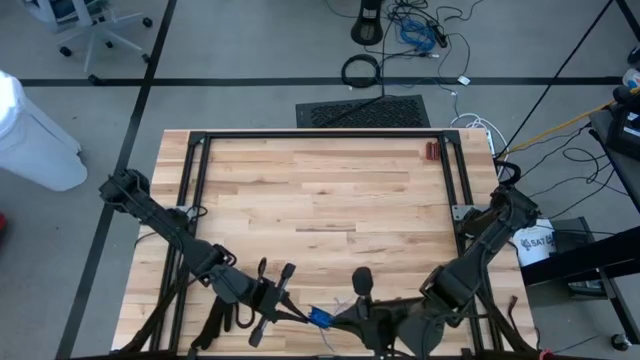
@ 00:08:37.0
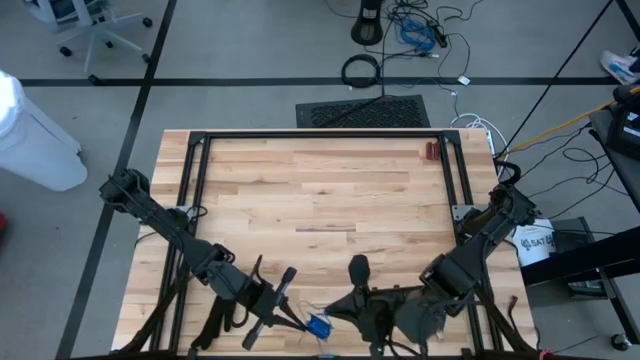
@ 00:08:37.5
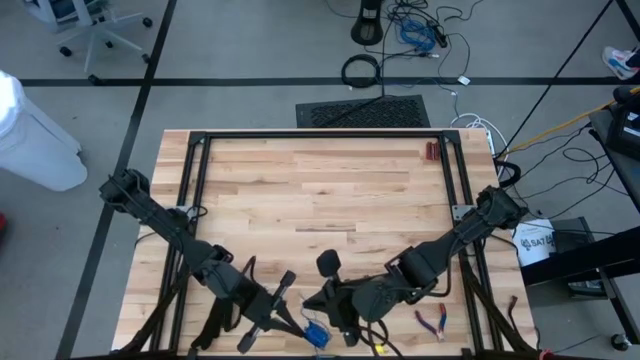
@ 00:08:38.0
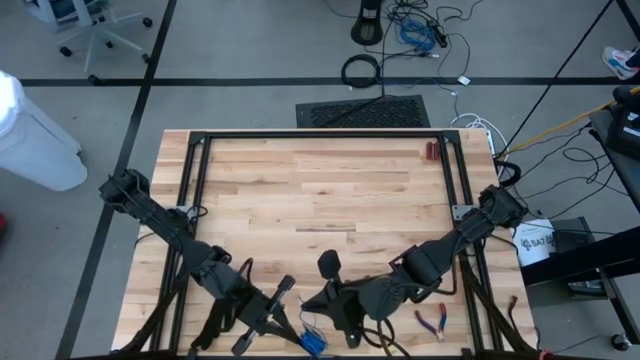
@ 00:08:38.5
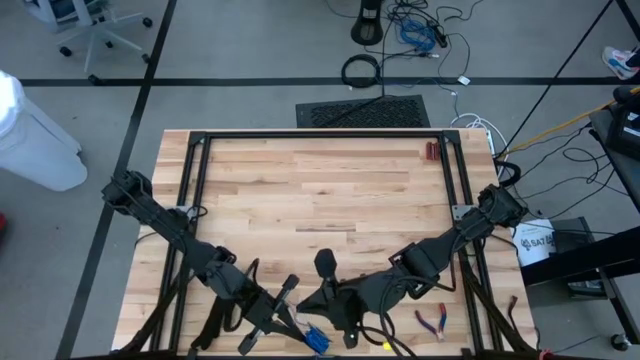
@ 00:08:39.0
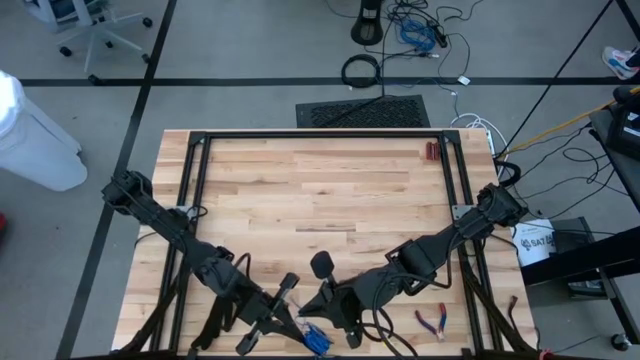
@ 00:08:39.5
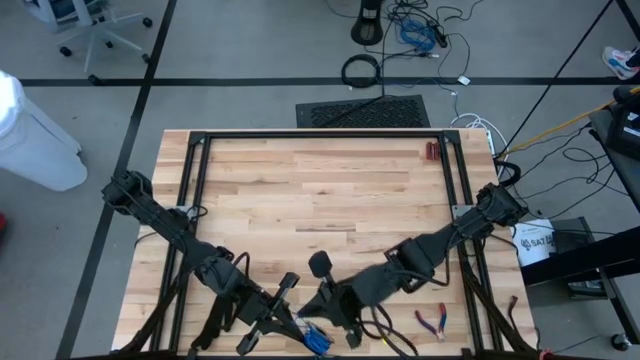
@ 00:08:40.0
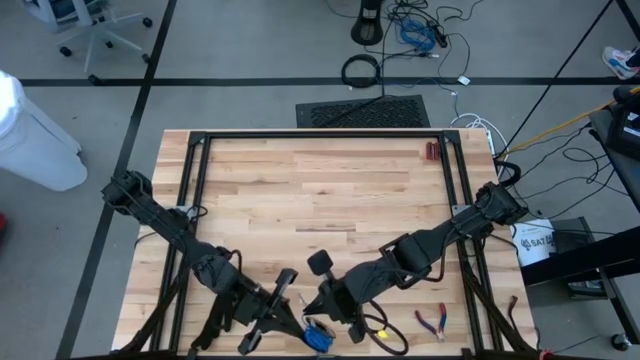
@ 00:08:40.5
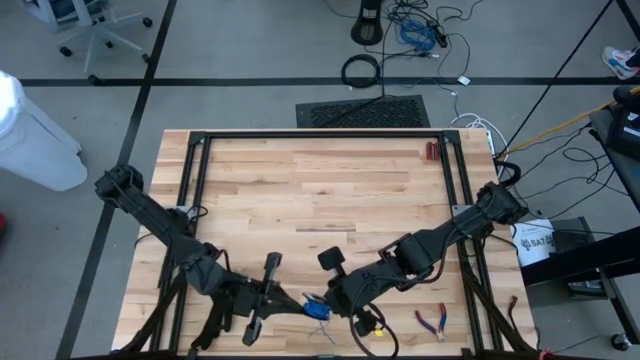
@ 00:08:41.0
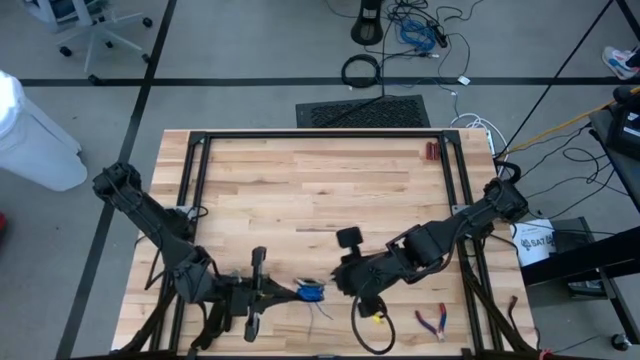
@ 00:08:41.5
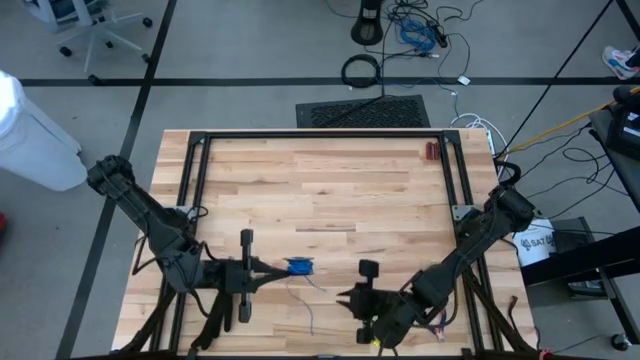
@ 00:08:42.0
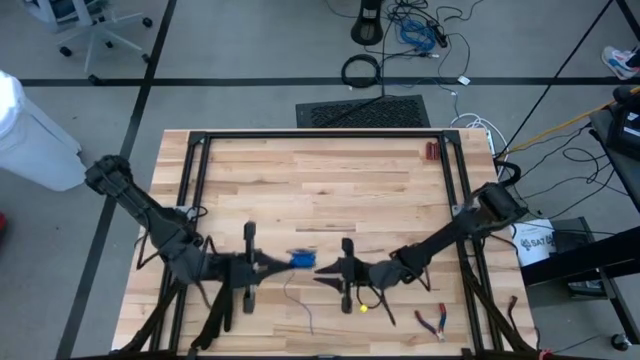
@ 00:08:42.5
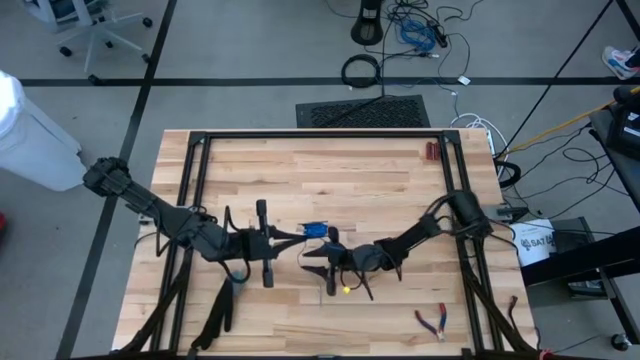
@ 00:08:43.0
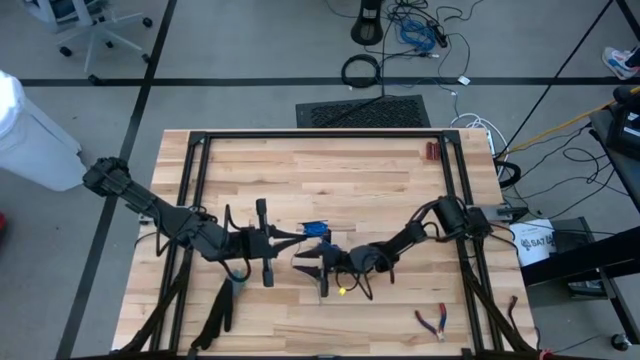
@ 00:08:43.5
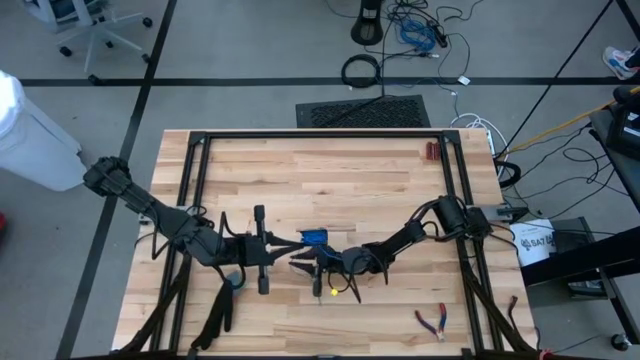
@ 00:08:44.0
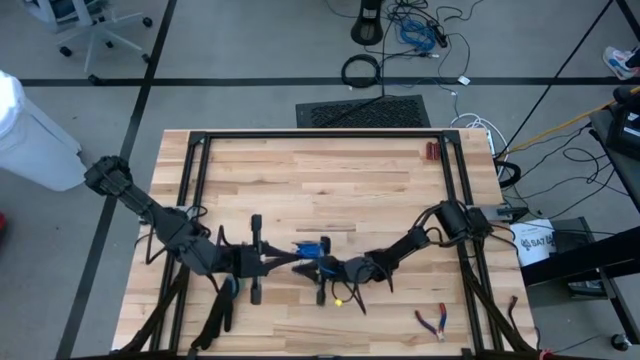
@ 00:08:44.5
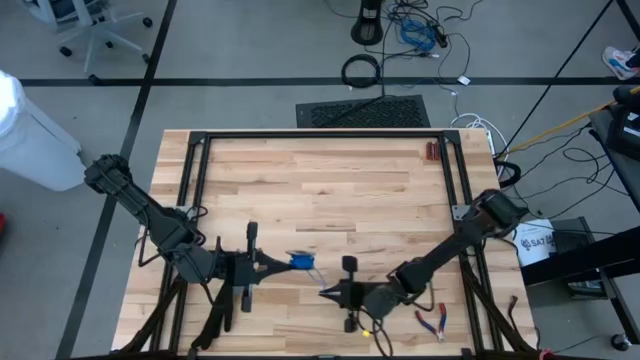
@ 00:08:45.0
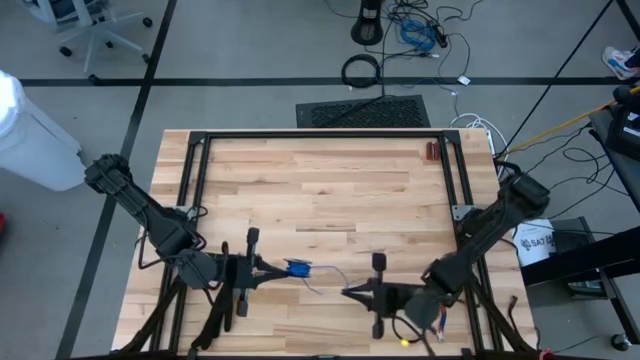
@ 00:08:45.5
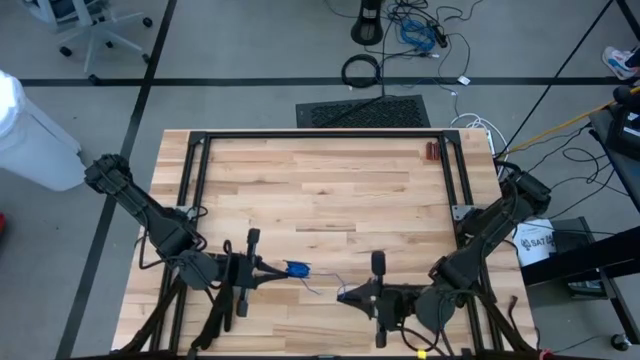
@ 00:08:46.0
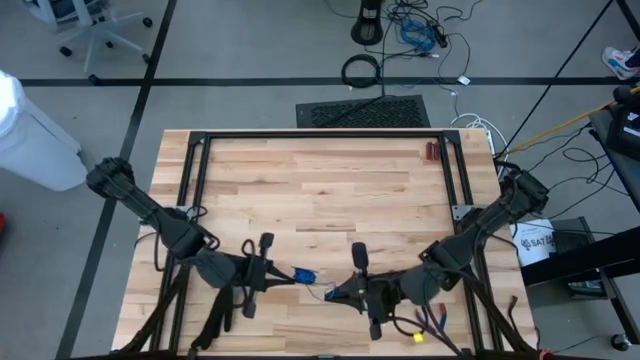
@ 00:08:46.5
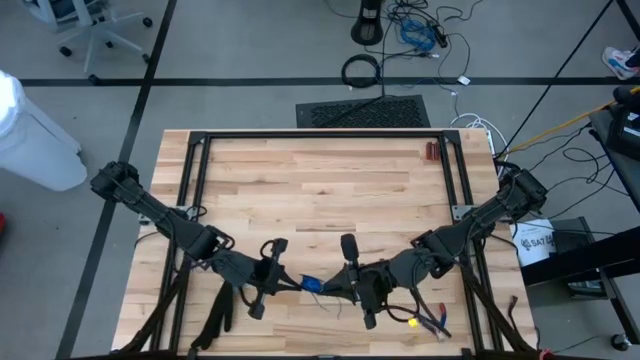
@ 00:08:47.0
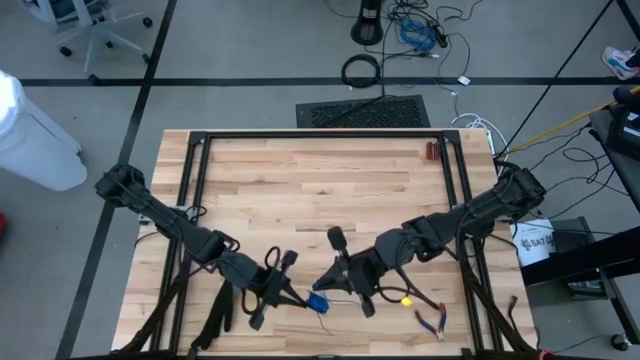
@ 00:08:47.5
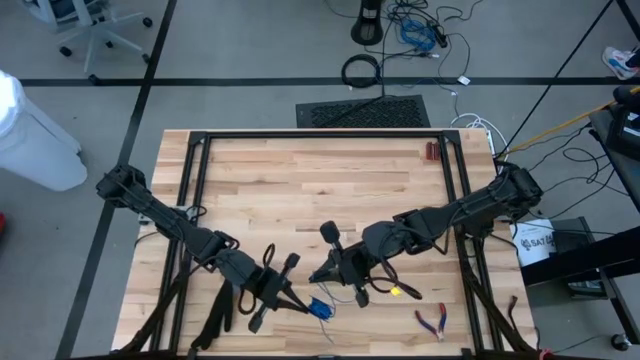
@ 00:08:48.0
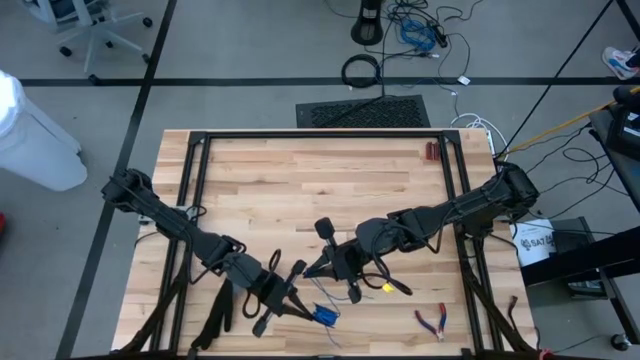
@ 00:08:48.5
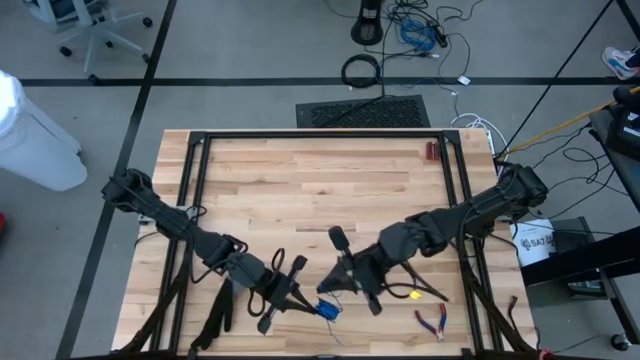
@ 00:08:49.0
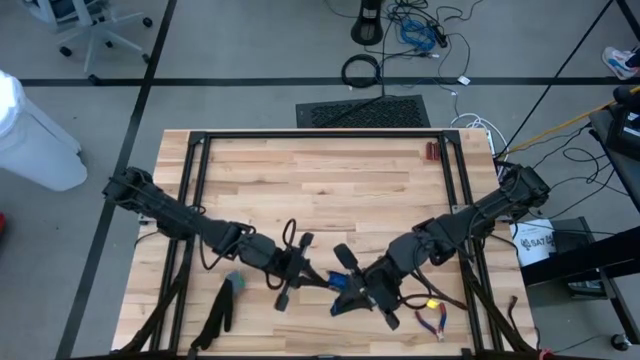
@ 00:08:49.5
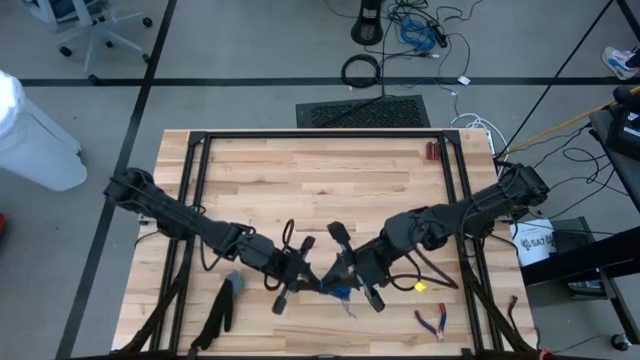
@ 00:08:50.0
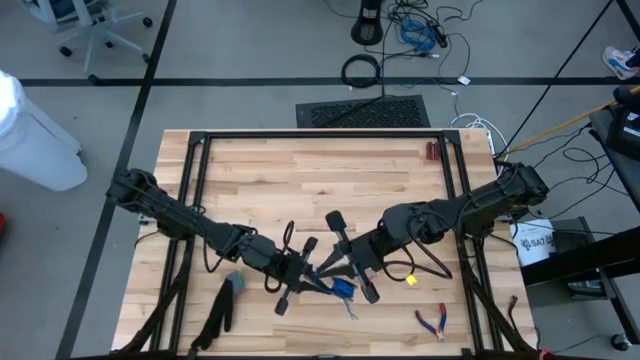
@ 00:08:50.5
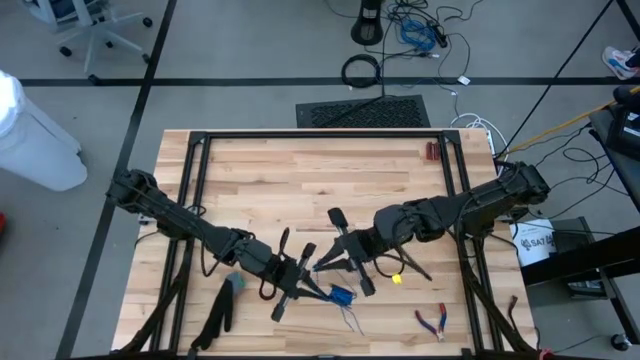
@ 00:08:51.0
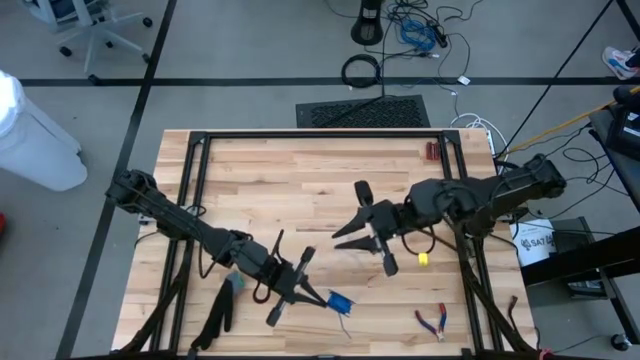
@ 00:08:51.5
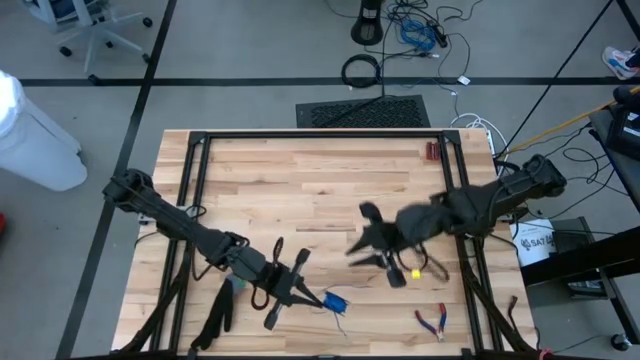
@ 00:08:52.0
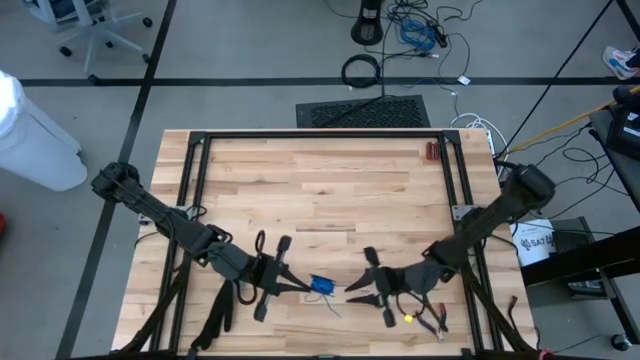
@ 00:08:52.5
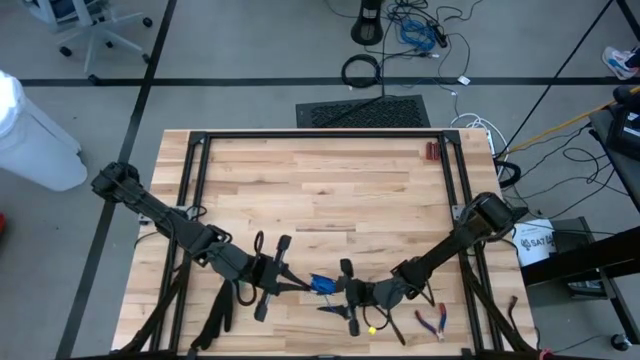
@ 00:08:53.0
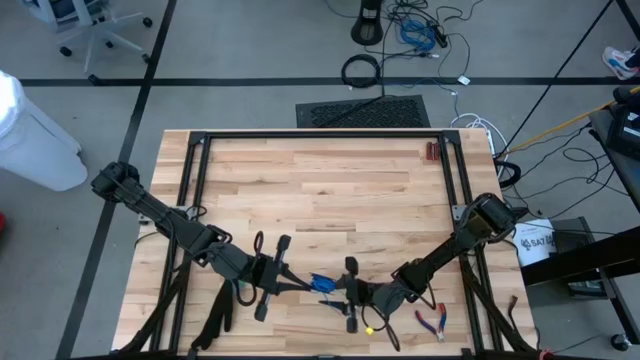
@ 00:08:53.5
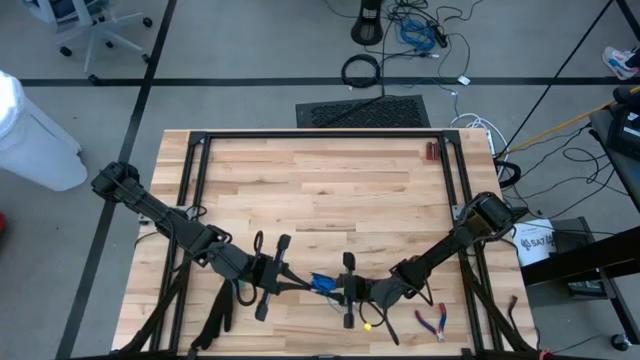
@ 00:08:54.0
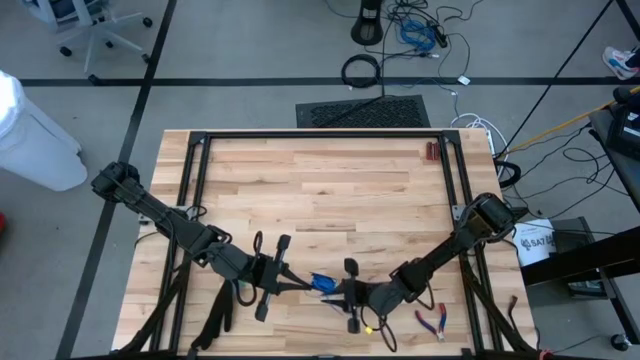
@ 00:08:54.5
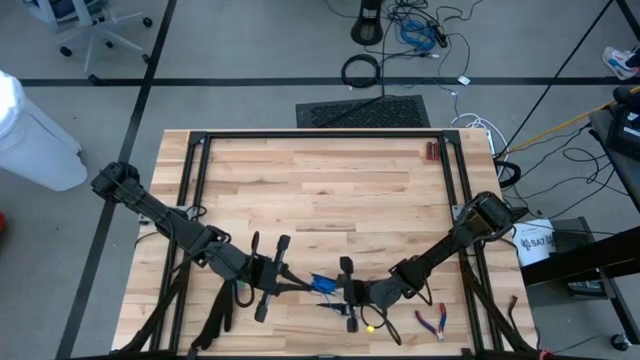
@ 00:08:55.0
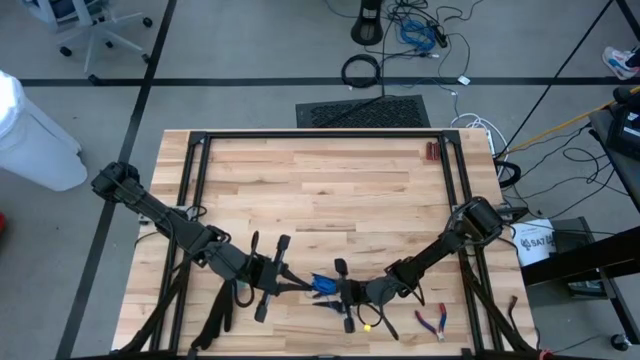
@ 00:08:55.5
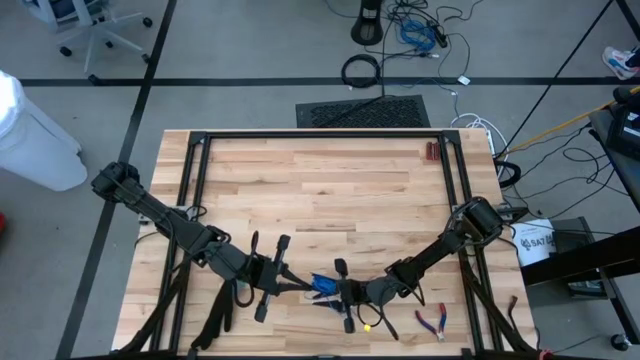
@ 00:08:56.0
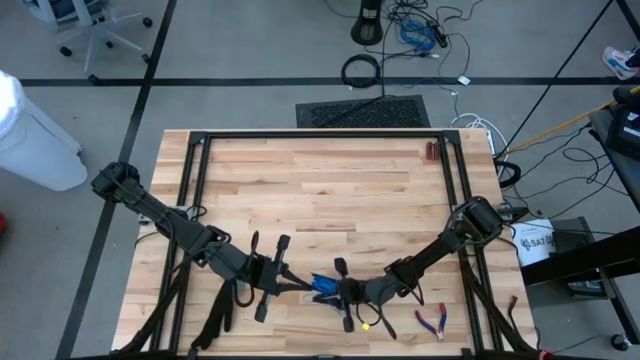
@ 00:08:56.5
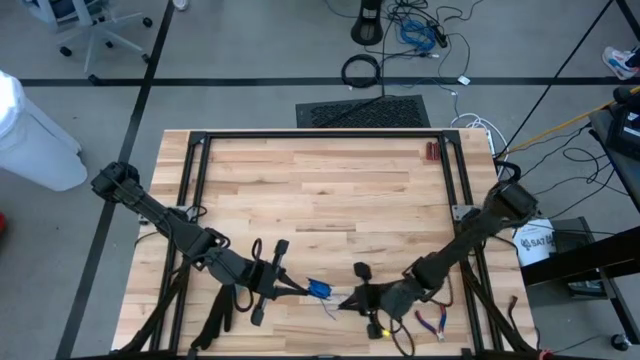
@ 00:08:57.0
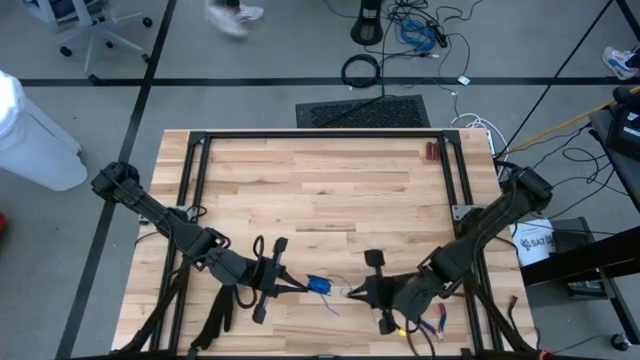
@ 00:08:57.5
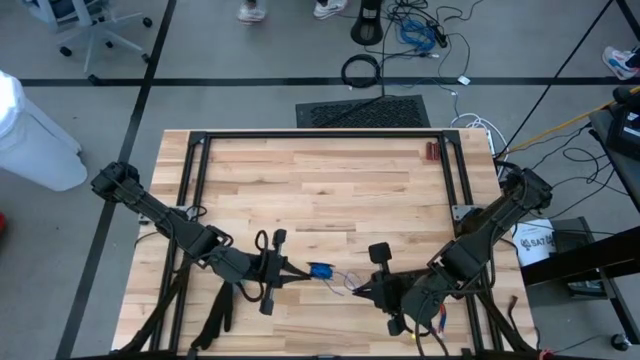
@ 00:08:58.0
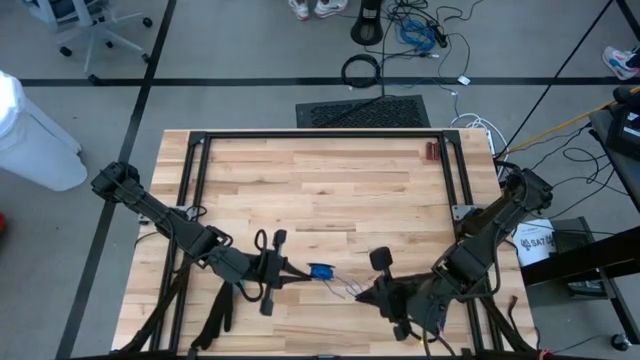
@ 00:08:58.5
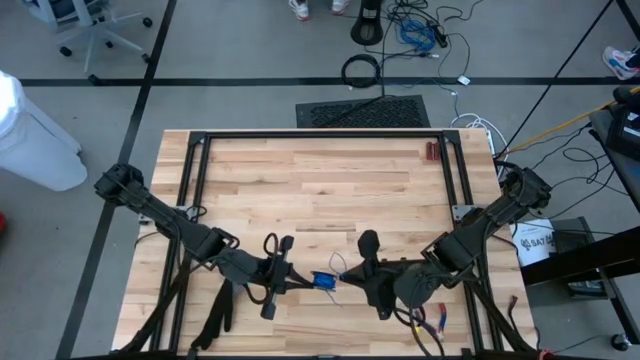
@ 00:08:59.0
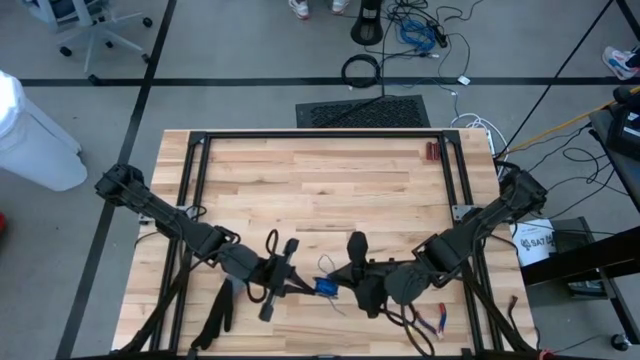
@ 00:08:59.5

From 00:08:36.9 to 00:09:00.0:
Task: Coil cords
Coil the blue wire onto the black spool
